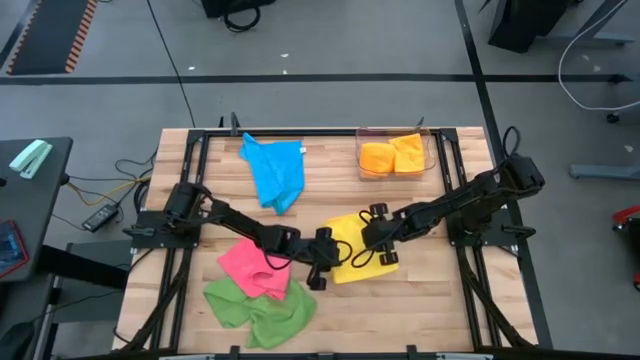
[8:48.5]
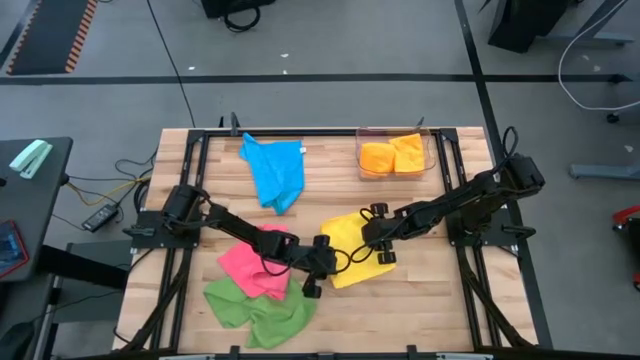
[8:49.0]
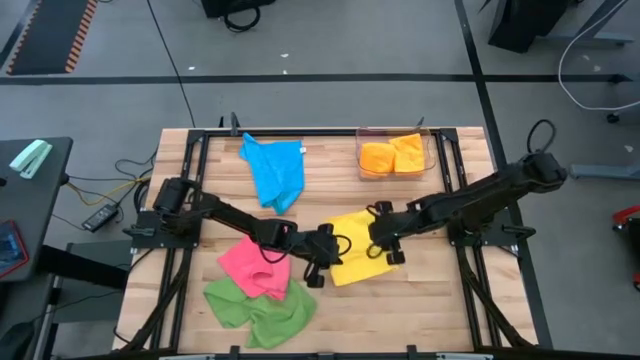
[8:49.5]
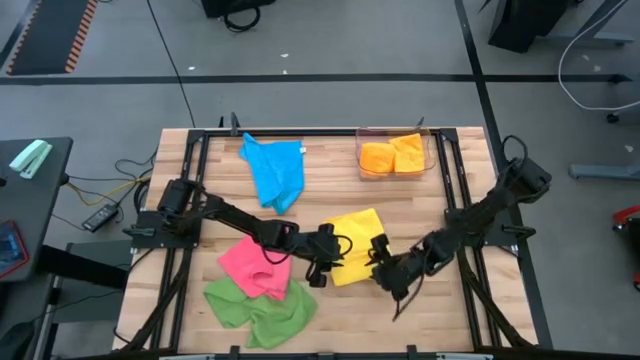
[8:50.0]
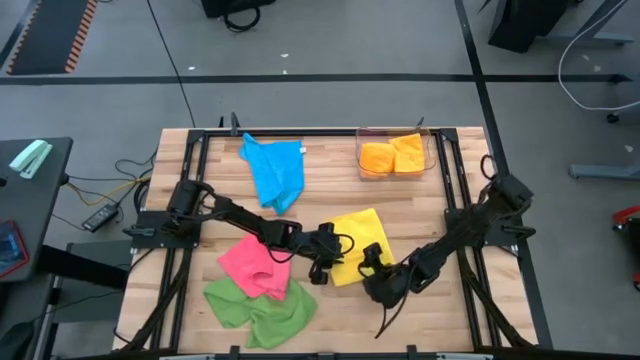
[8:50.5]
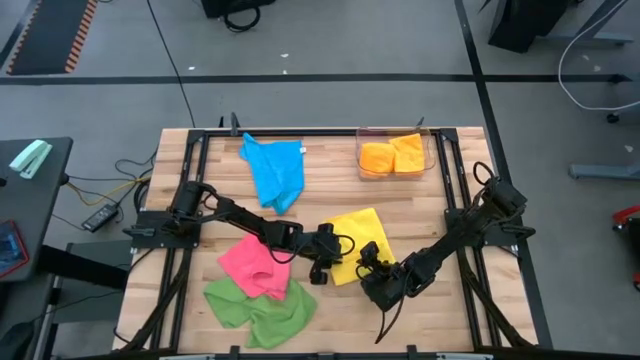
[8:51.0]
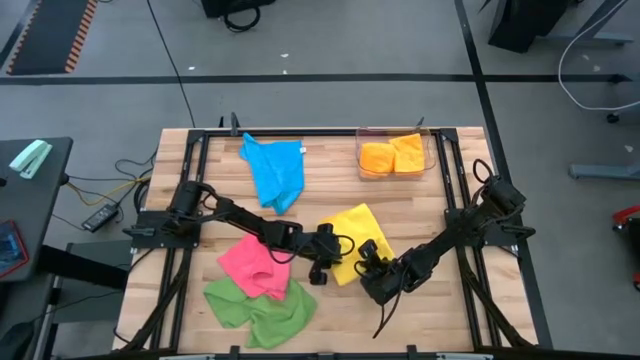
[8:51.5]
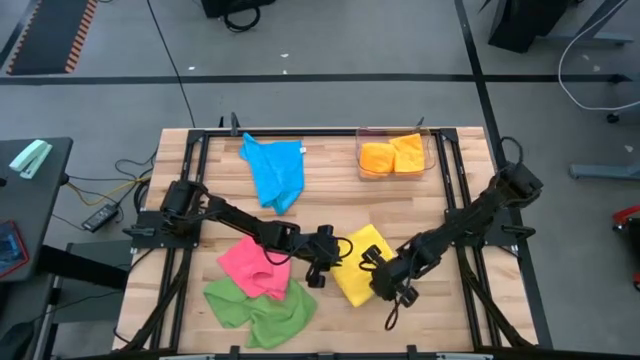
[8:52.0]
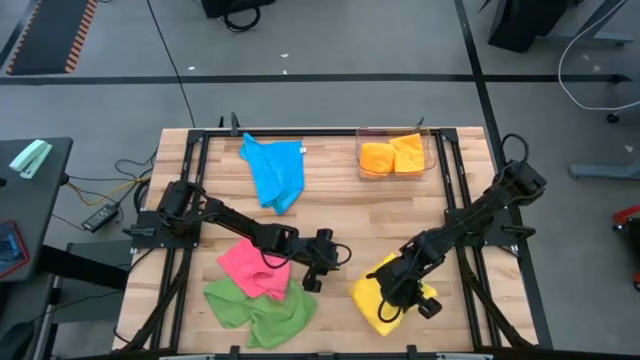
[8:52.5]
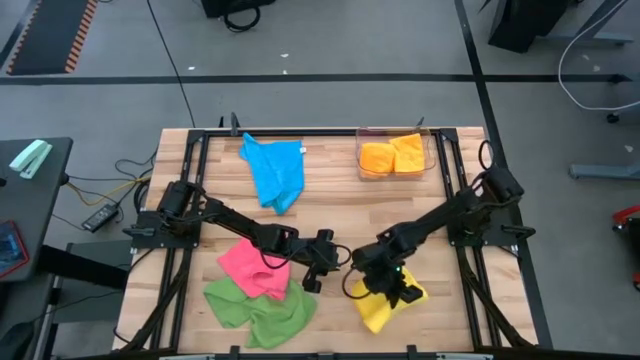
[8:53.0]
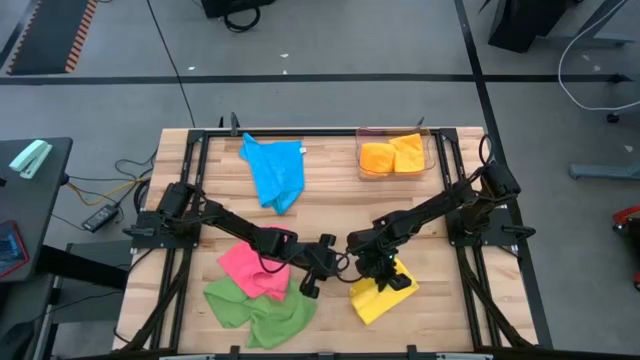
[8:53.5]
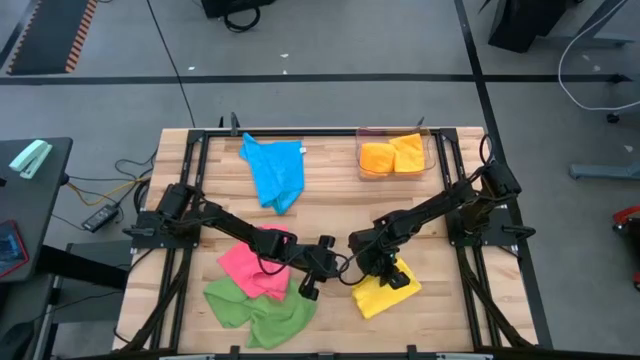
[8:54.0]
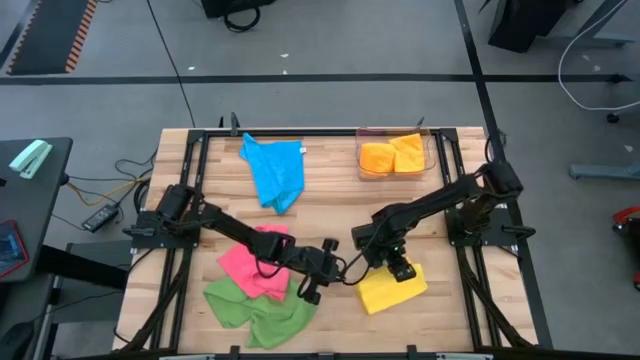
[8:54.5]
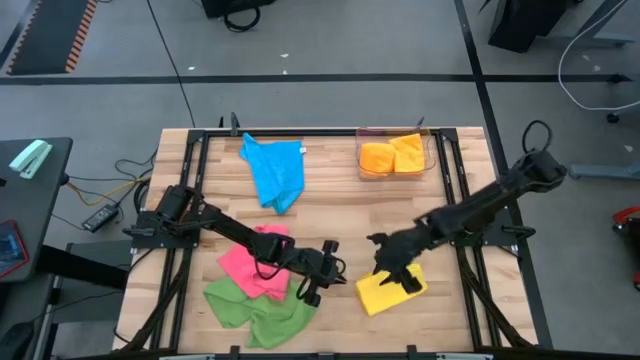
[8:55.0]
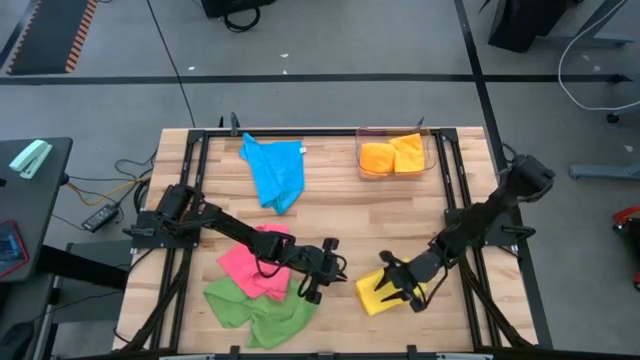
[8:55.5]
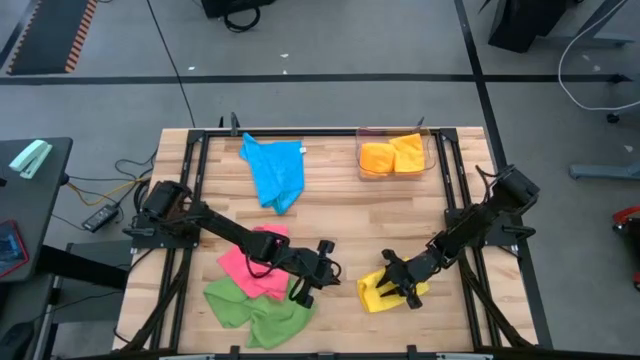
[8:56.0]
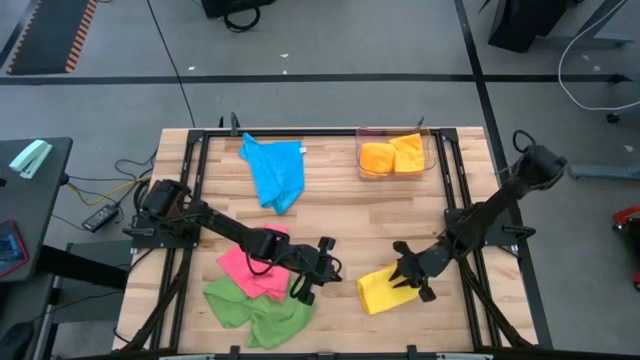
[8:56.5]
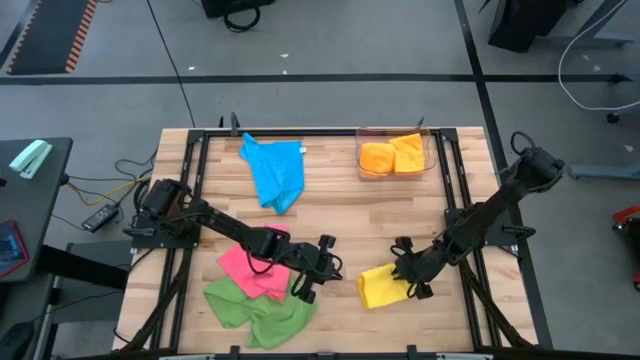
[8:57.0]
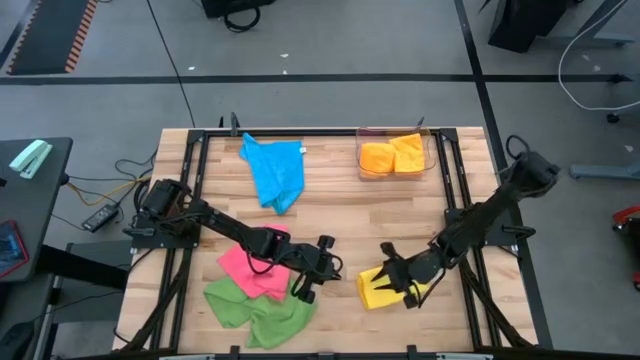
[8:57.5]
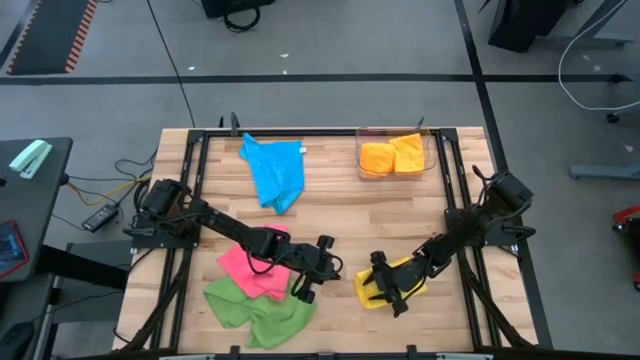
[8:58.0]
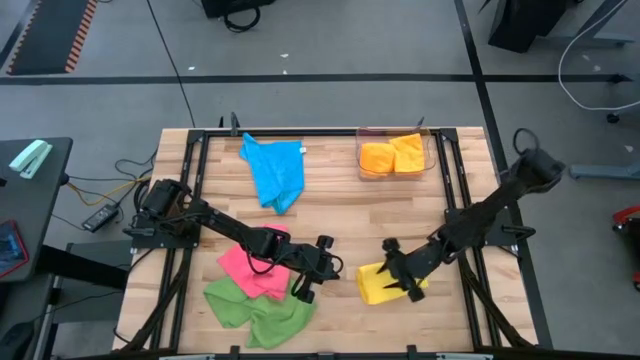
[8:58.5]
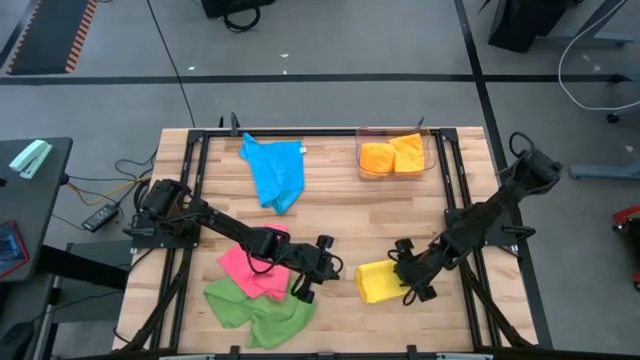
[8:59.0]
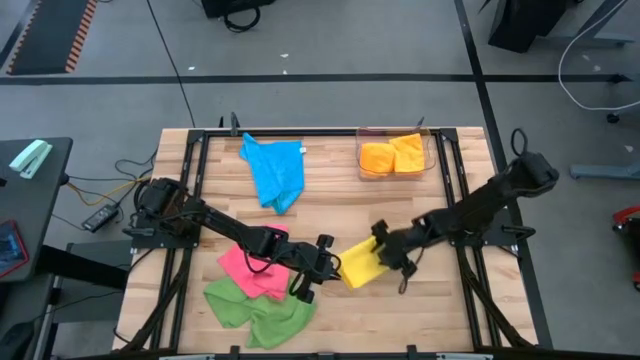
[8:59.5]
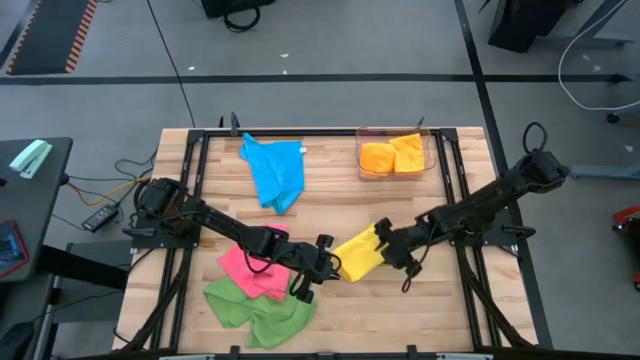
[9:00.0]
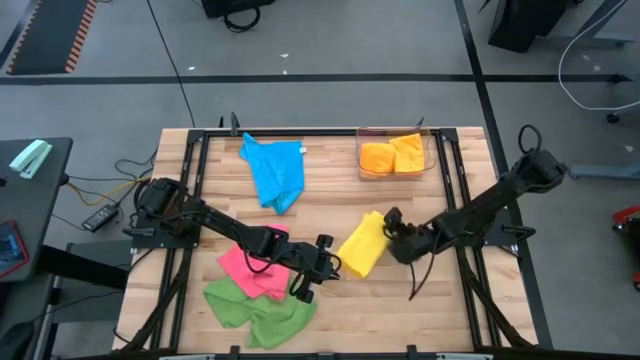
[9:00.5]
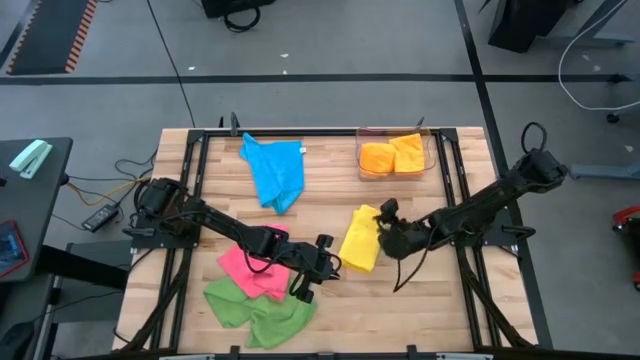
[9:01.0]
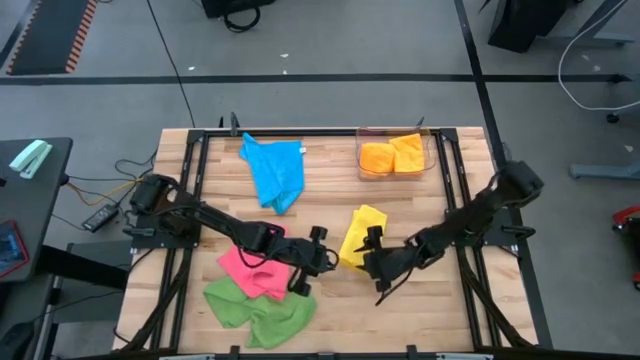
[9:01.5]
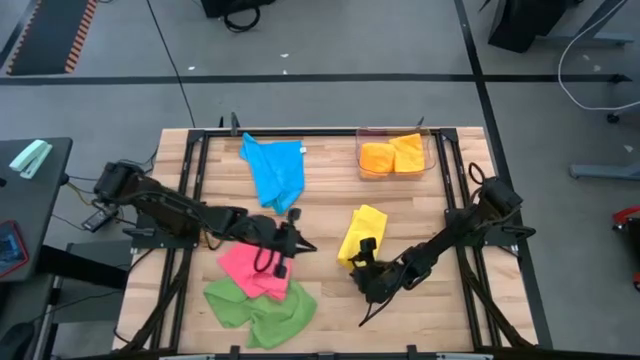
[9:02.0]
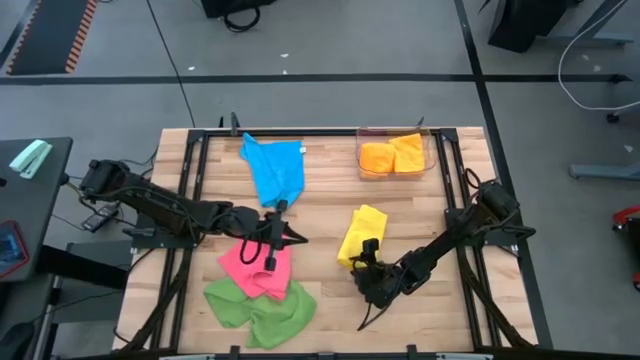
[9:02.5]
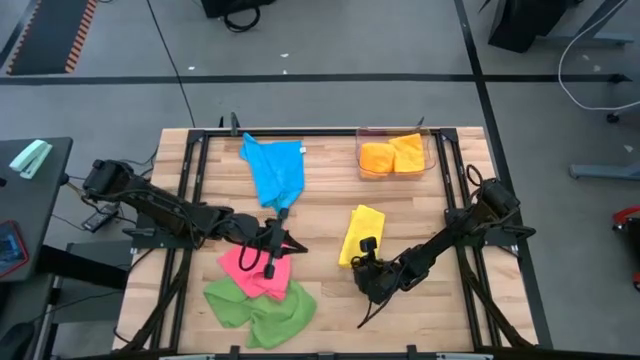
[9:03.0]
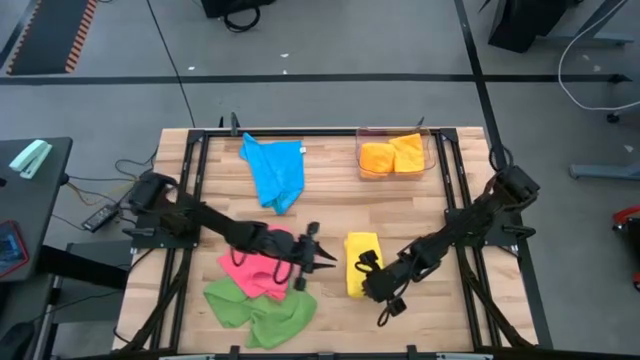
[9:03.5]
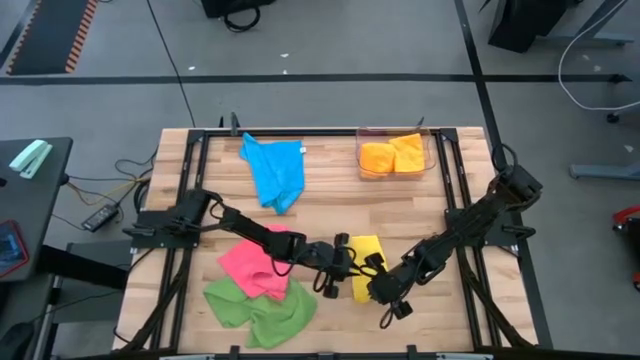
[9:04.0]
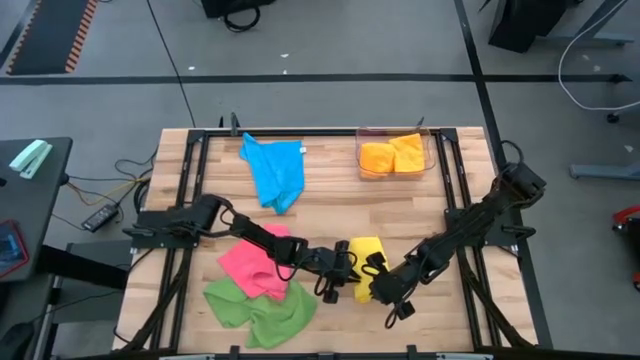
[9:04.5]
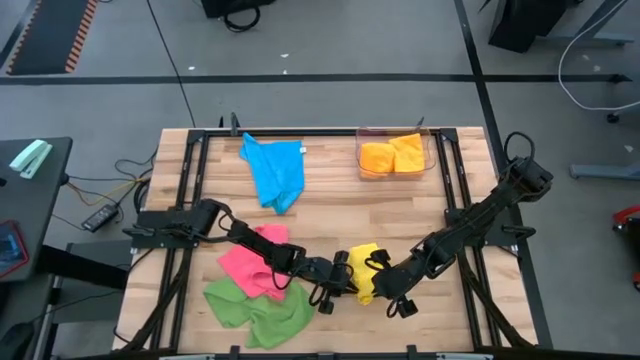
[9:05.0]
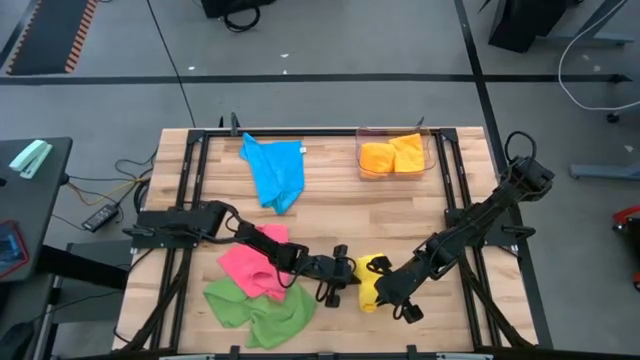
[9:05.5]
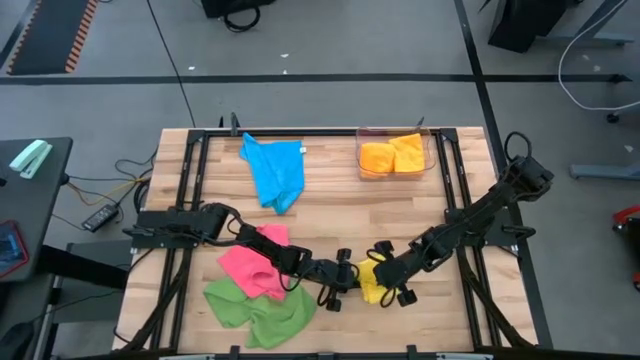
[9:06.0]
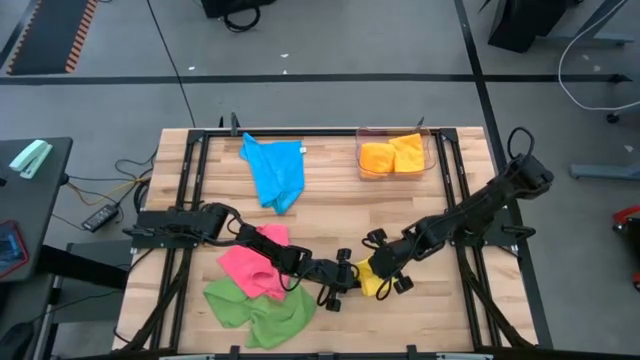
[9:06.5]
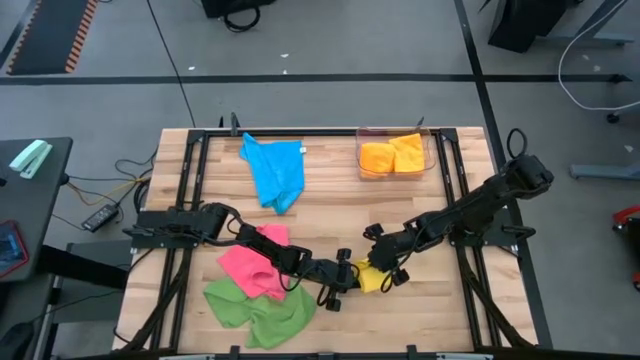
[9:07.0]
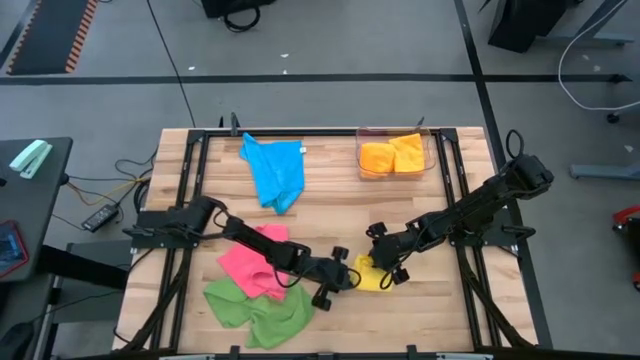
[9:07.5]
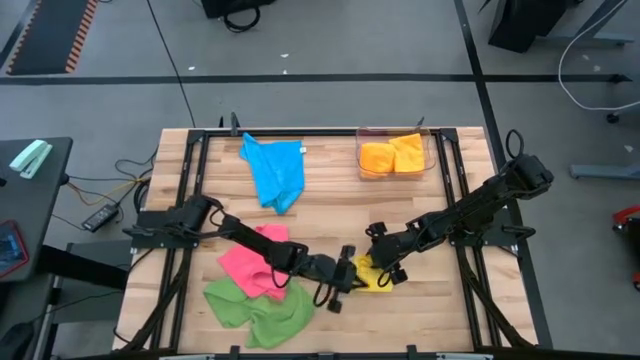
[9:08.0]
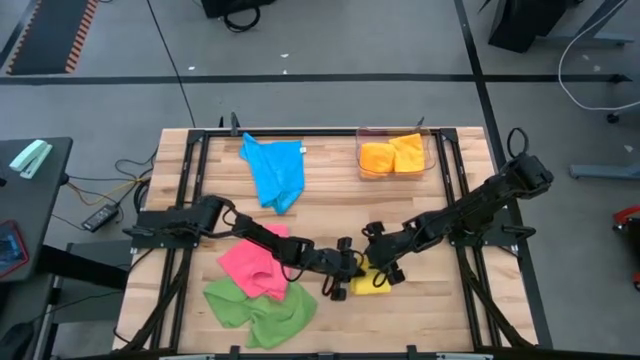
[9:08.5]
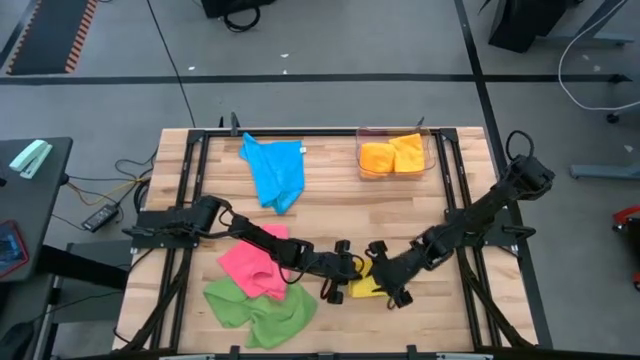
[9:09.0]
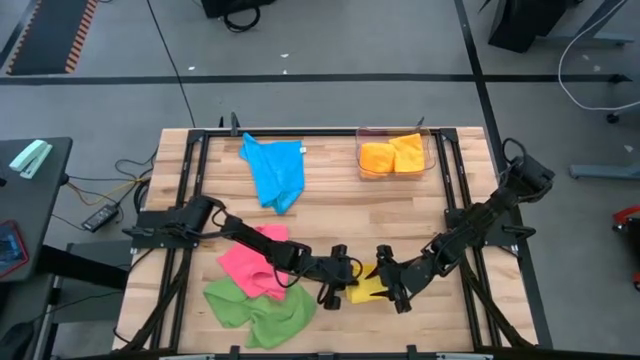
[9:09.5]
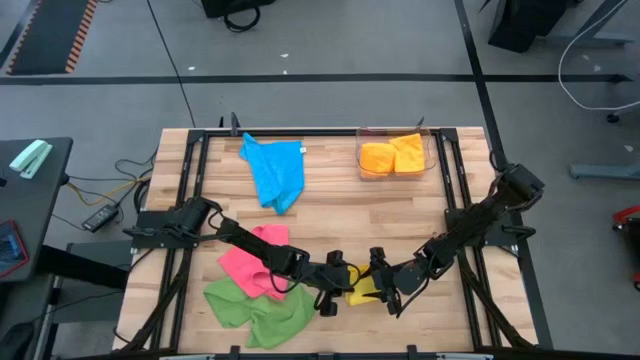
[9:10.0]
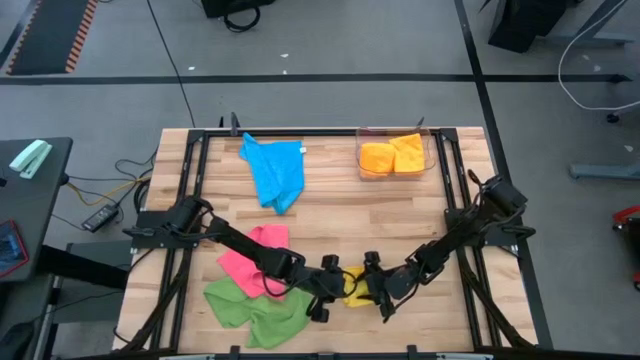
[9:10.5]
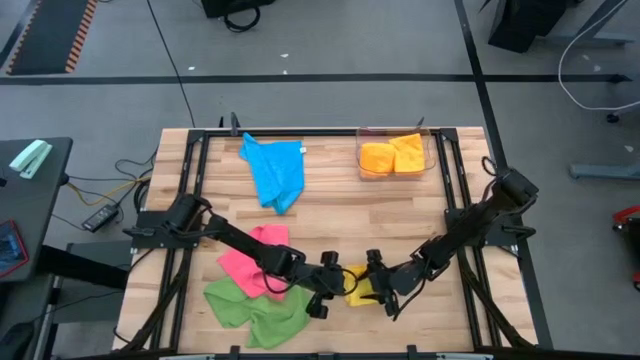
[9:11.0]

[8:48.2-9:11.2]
Task: Fold microfiber towels
Fold the yellow microfiber cloth
